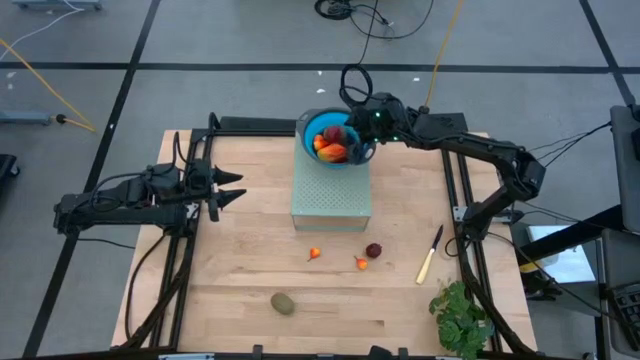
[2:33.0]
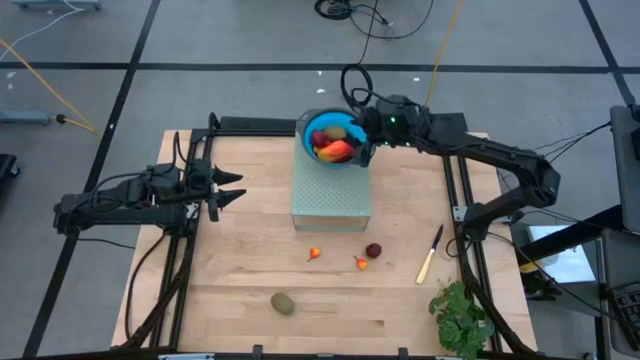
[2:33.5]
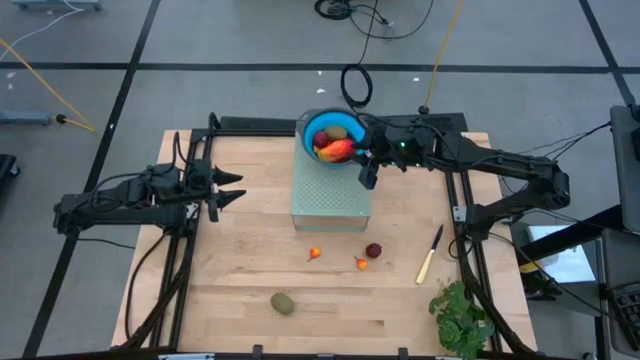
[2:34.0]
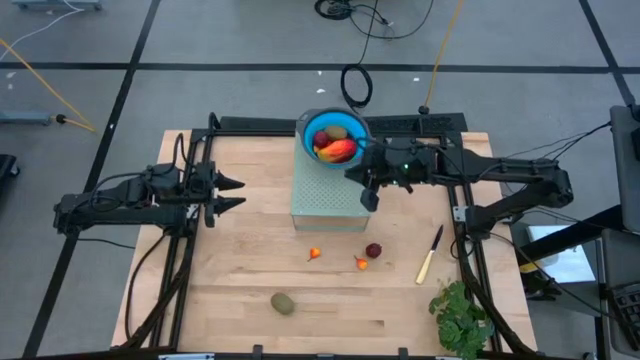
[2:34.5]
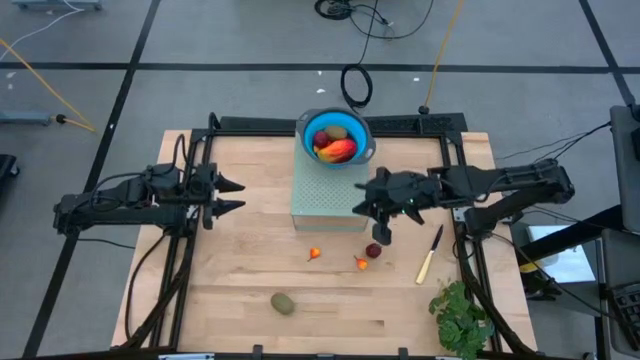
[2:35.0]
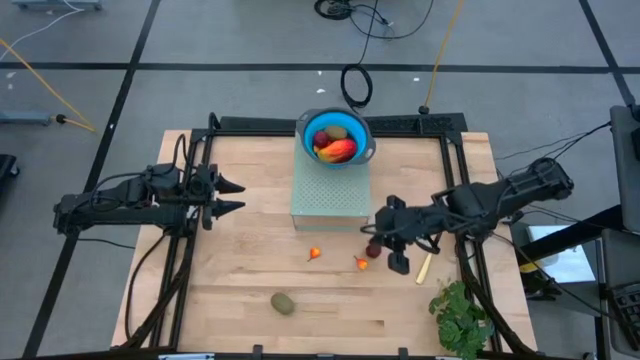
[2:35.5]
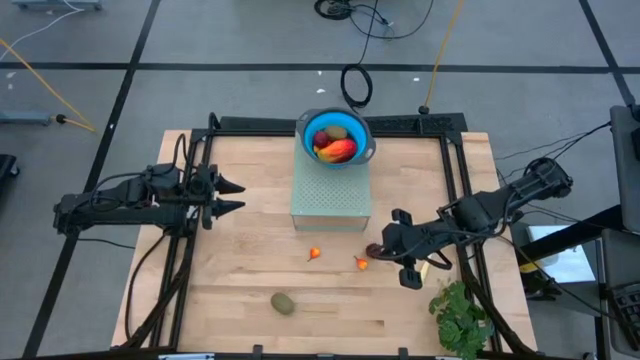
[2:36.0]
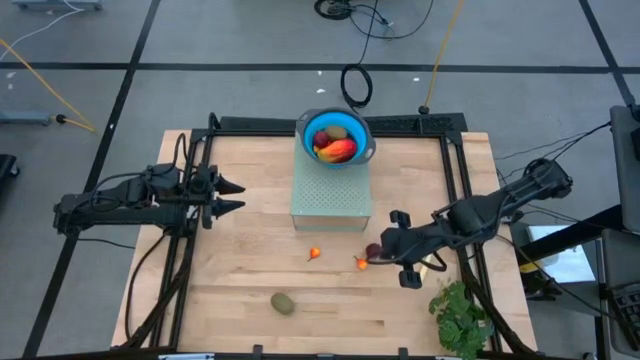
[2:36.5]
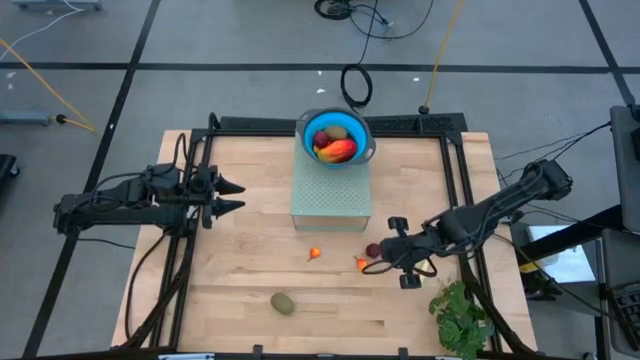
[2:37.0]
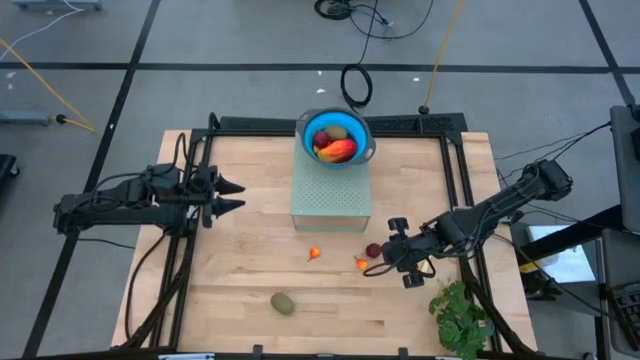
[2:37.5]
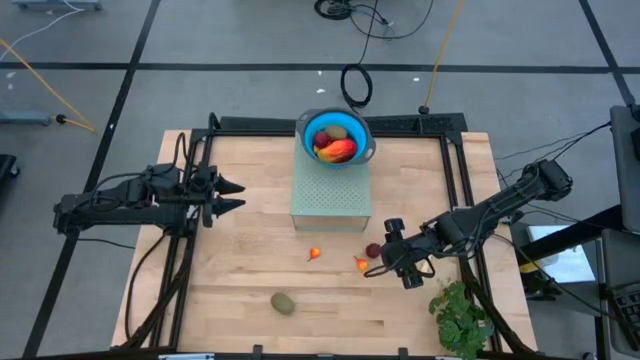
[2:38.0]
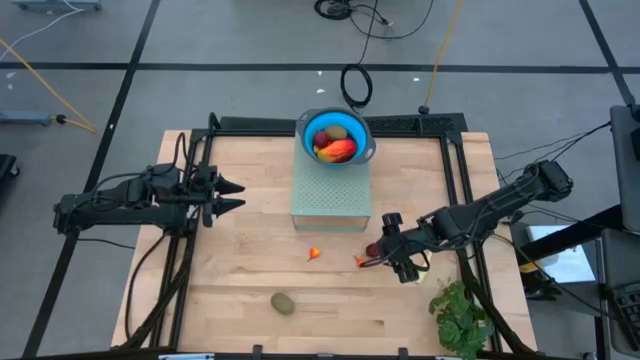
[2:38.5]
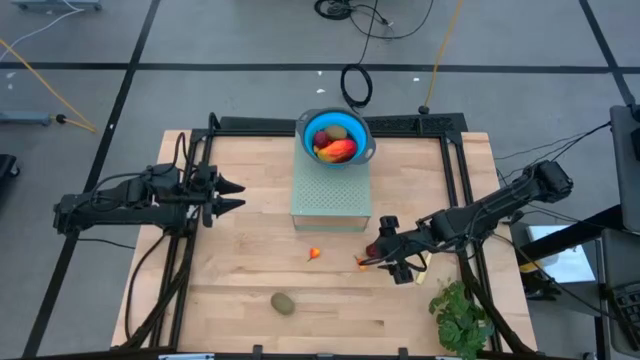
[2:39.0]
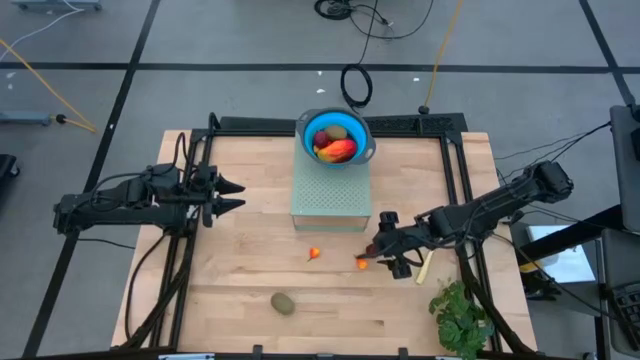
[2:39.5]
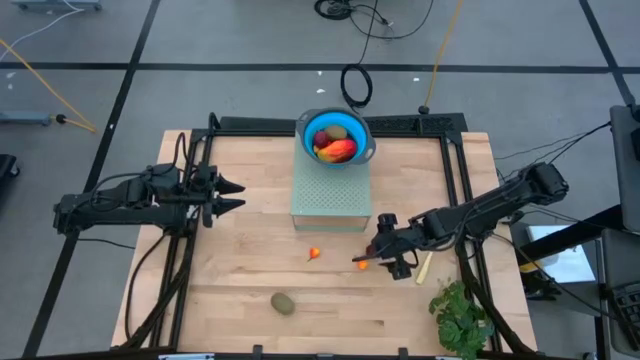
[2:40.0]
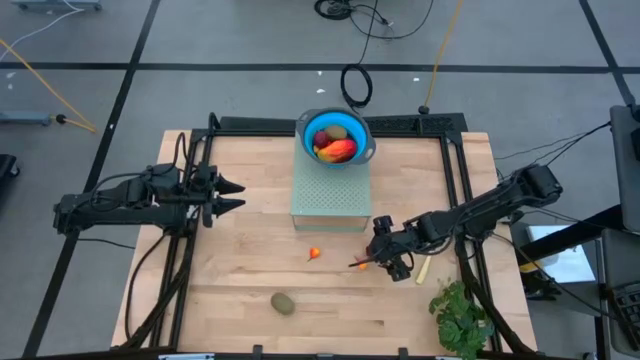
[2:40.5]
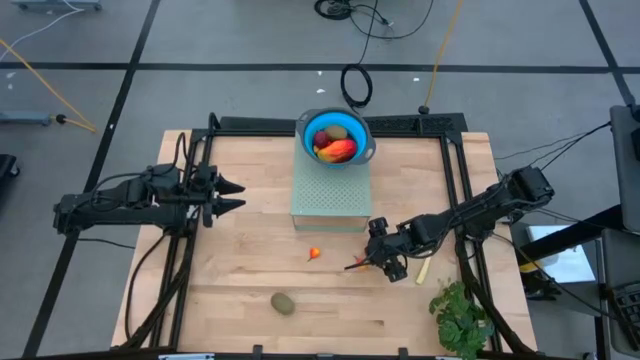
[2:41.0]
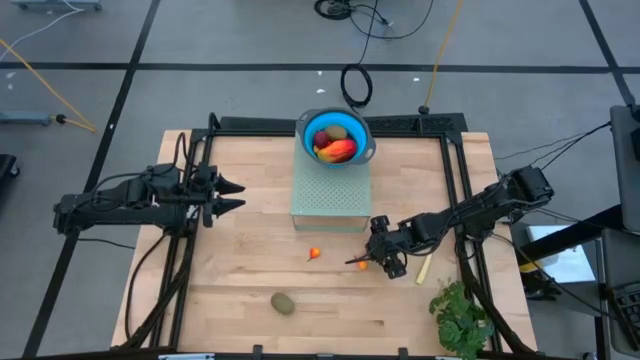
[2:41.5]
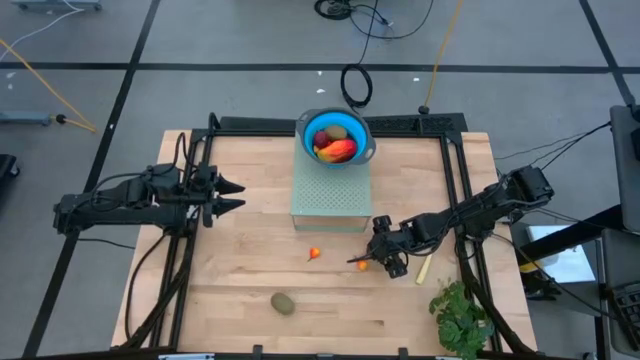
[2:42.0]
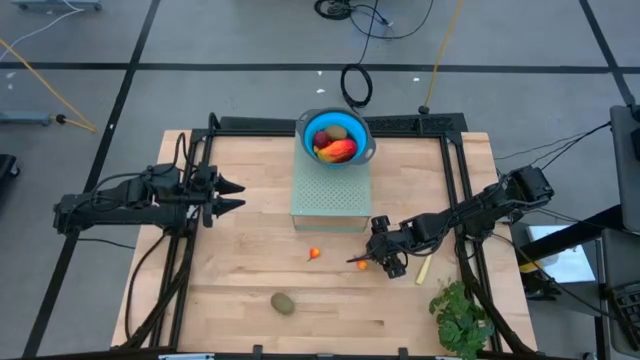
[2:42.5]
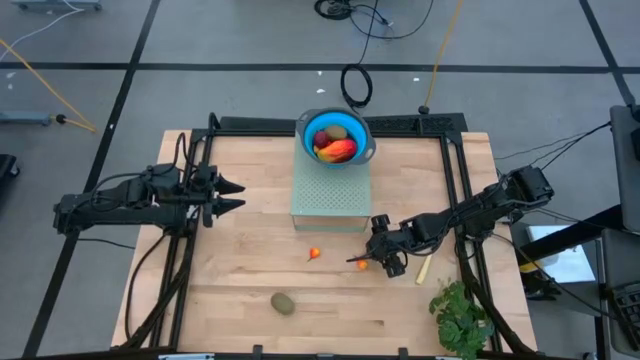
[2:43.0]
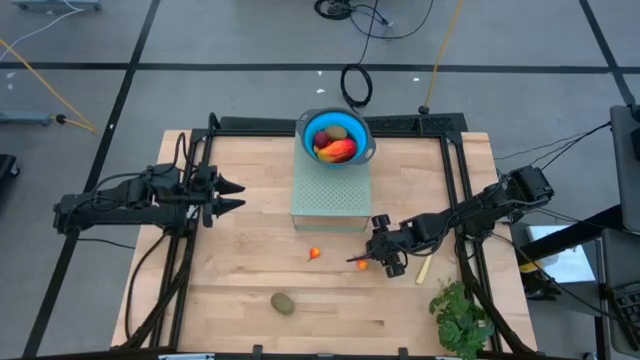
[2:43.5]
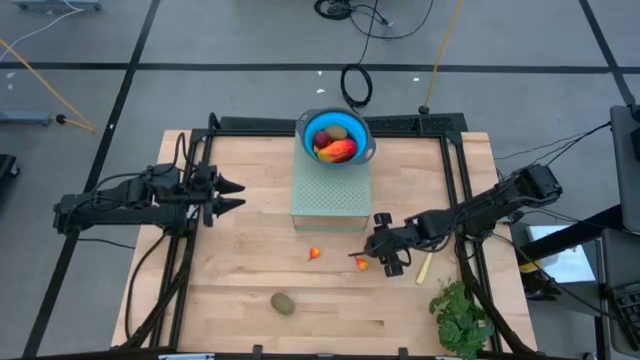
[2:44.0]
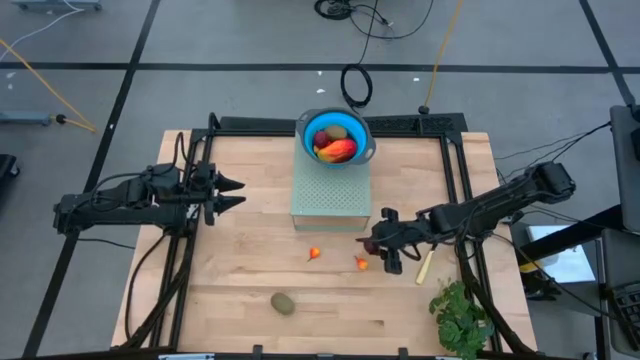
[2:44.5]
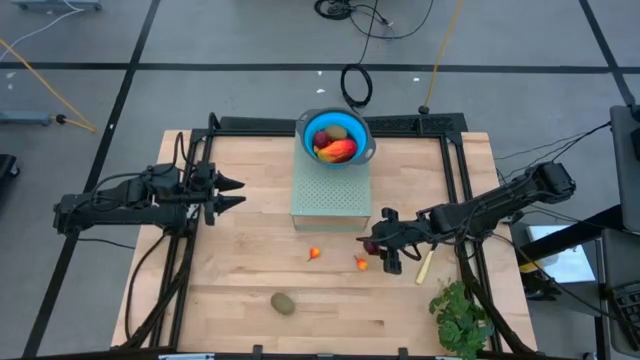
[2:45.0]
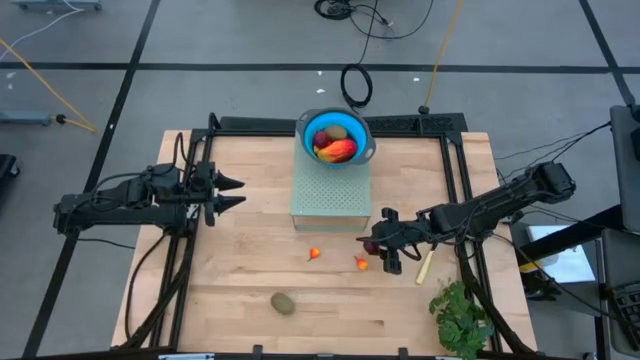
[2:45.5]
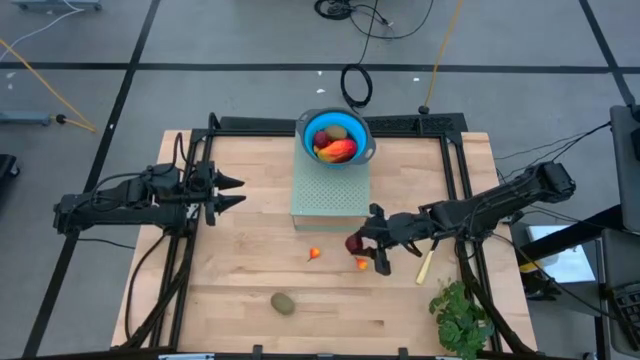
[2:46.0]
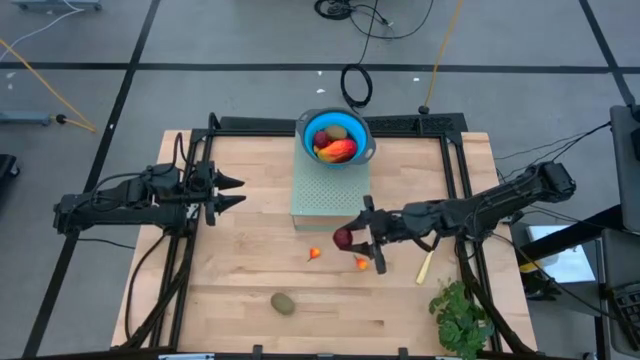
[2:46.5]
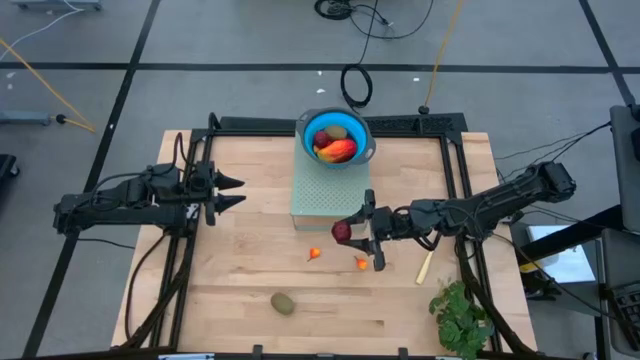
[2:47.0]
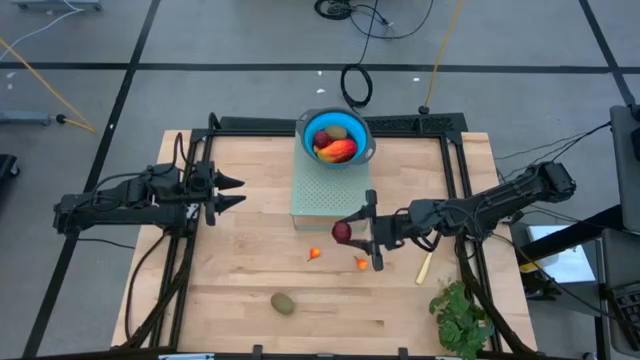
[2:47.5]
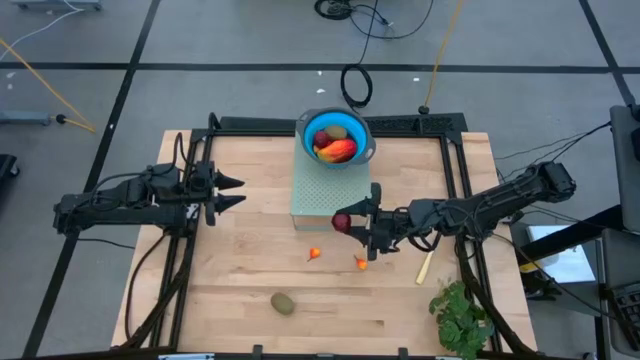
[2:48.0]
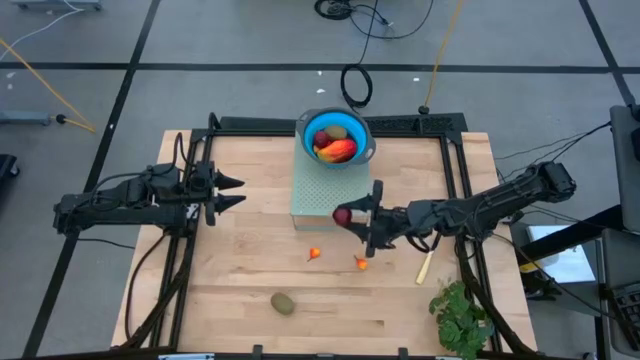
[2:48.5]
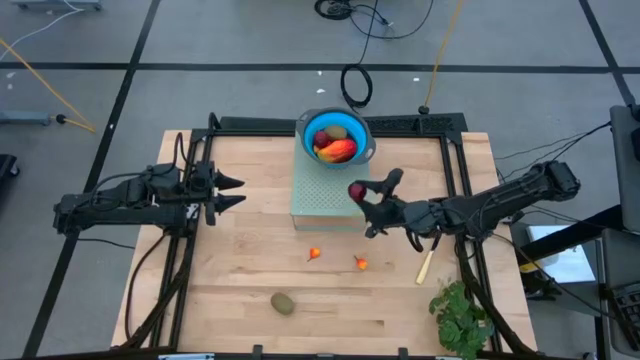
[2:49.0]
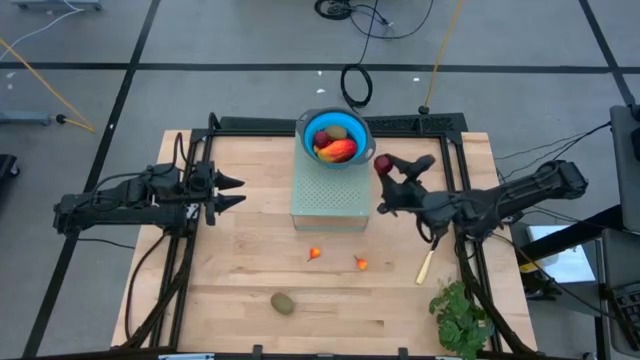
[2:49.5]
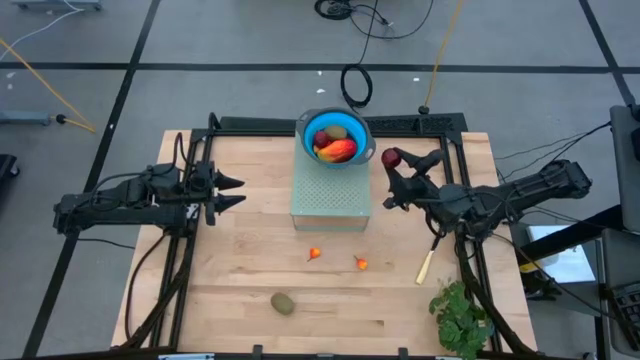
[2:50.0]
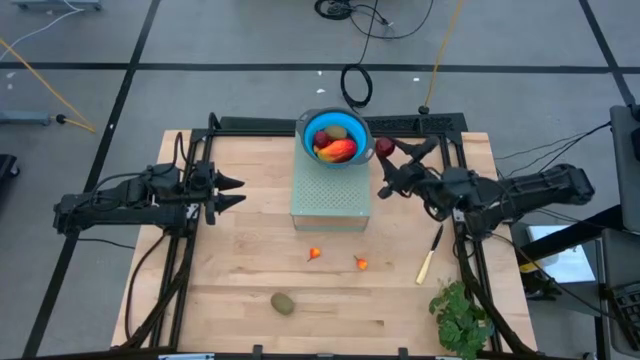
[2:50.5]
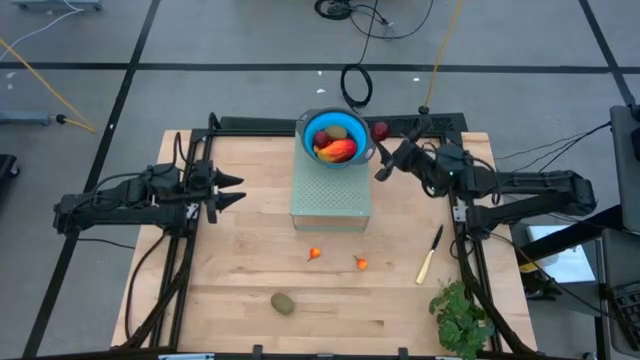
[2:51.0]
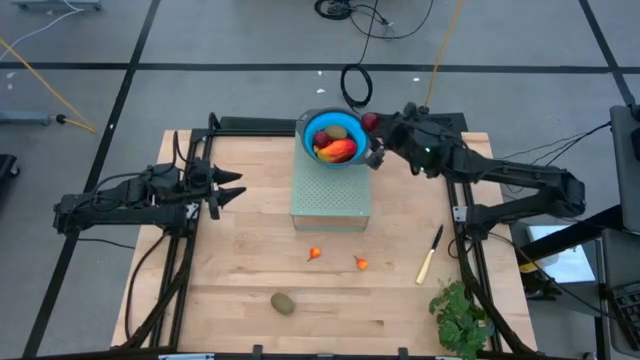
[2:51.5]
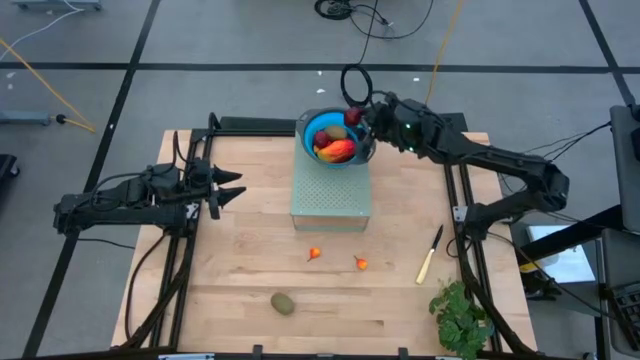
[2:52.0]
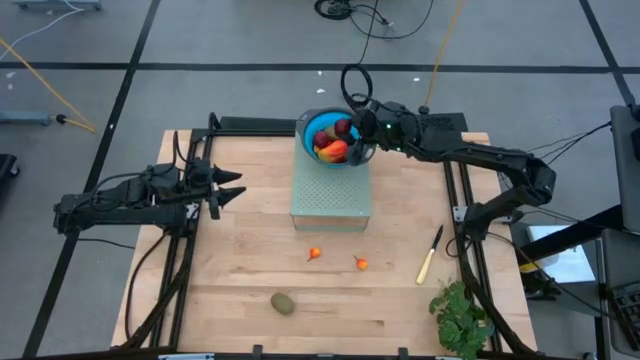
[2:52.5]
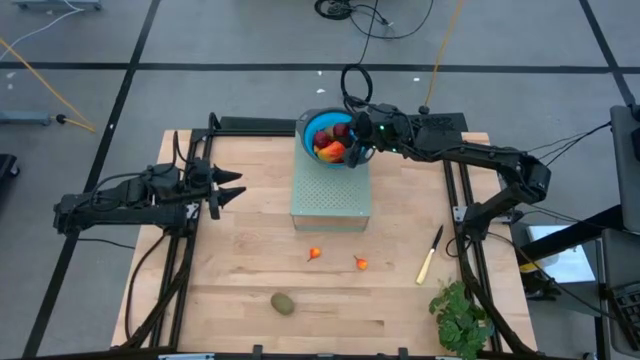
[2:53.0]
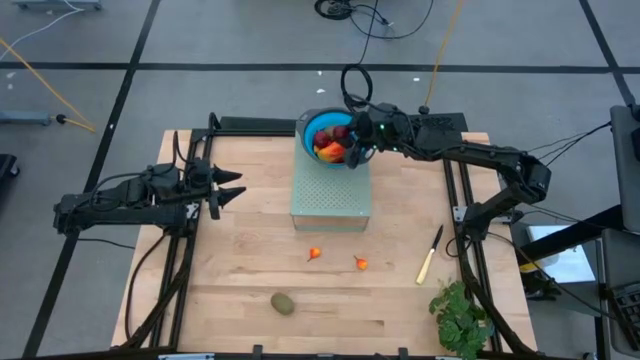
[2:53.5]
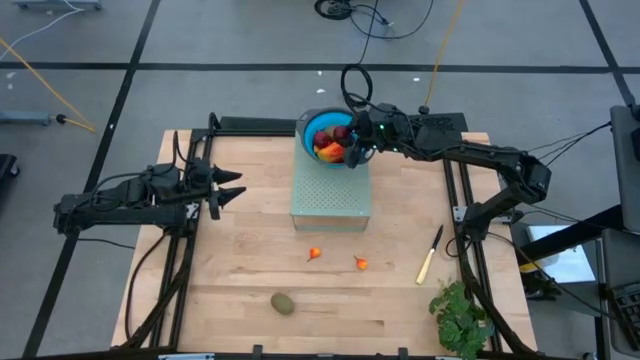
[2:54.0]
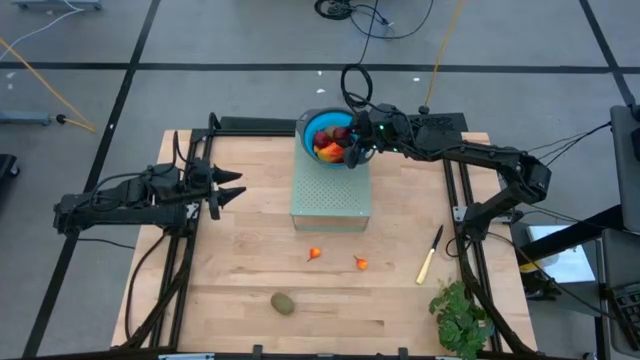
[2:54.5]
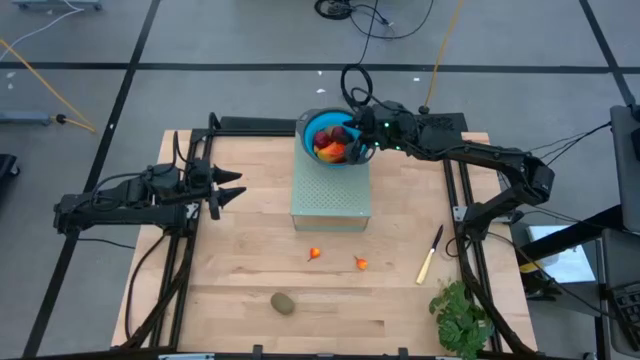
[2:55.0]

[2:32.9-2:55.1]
Task: Pick & Place Fruit
Put the pomegranate into the blue strainer bowl on the shelf
